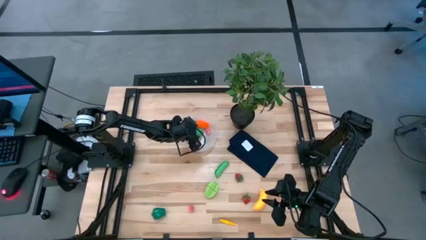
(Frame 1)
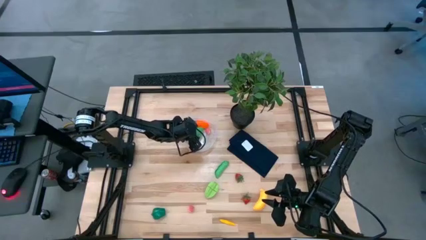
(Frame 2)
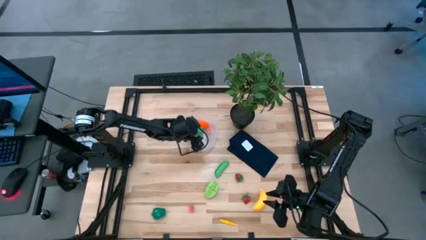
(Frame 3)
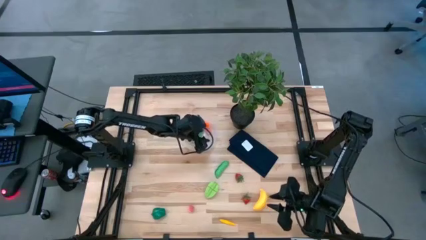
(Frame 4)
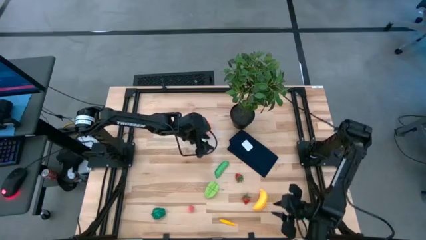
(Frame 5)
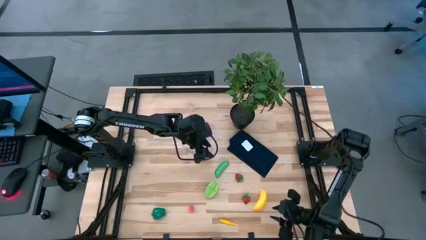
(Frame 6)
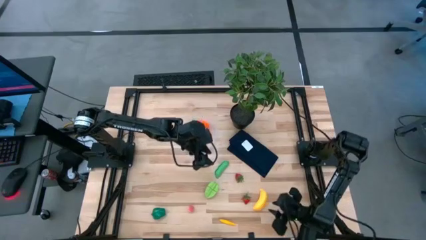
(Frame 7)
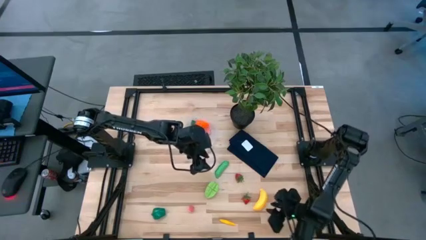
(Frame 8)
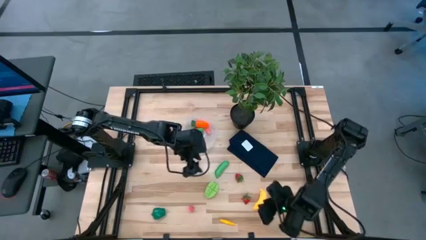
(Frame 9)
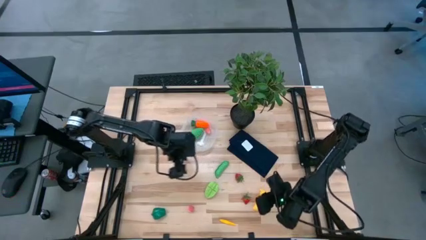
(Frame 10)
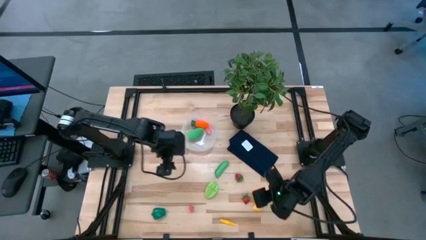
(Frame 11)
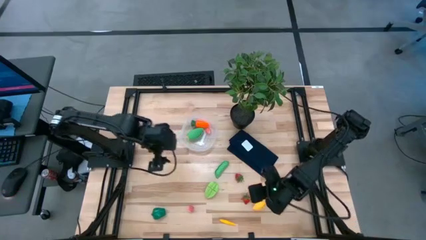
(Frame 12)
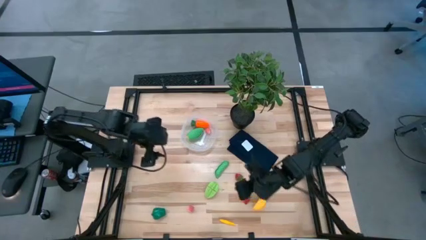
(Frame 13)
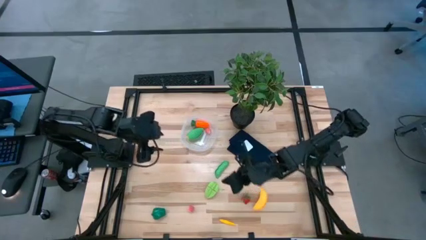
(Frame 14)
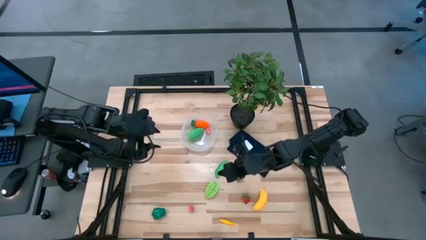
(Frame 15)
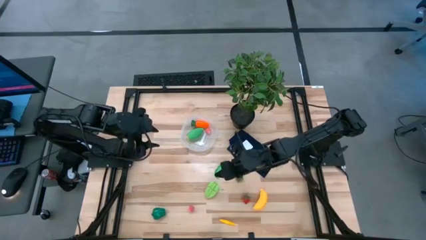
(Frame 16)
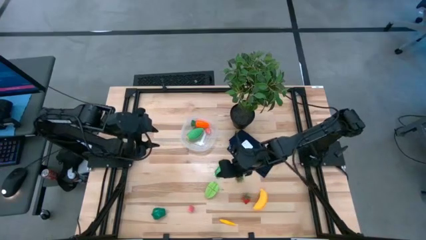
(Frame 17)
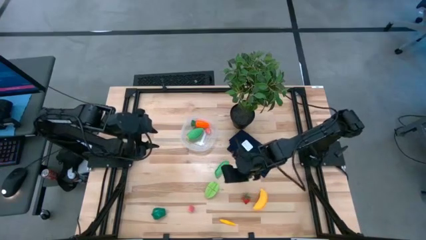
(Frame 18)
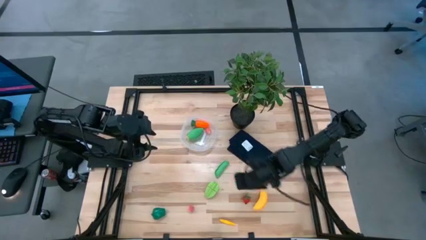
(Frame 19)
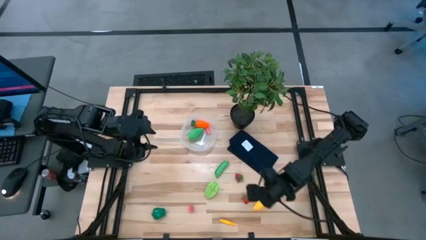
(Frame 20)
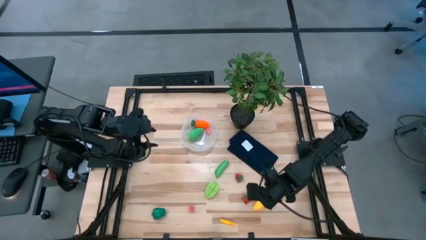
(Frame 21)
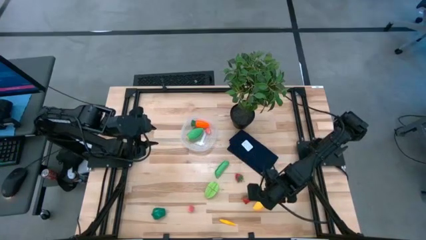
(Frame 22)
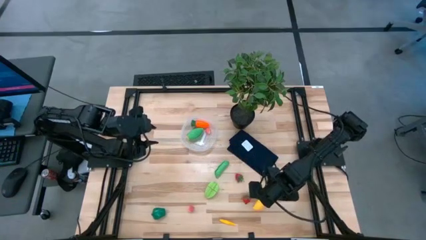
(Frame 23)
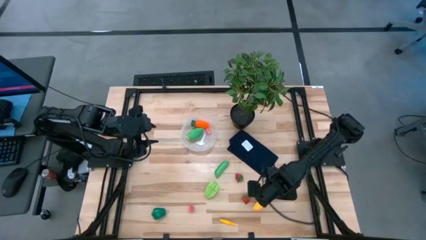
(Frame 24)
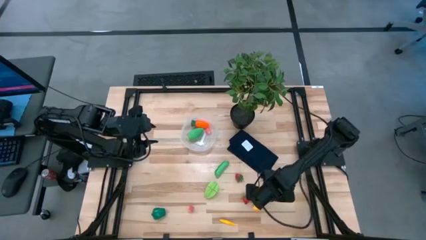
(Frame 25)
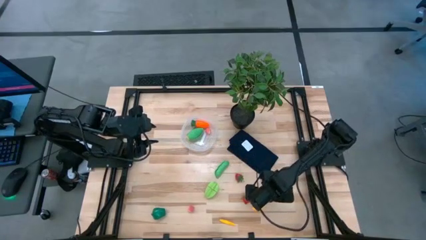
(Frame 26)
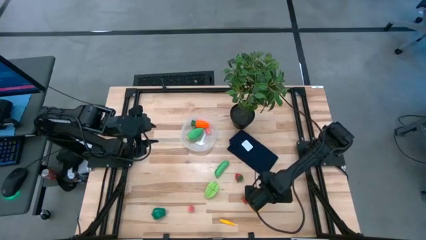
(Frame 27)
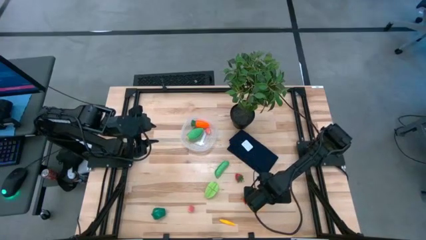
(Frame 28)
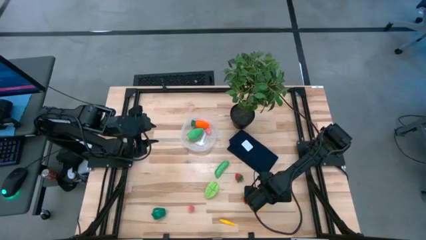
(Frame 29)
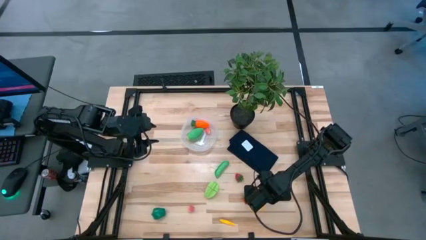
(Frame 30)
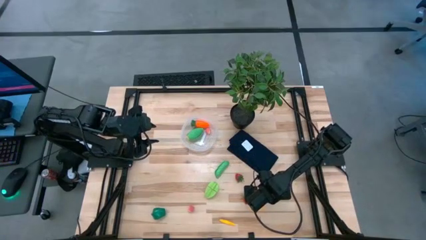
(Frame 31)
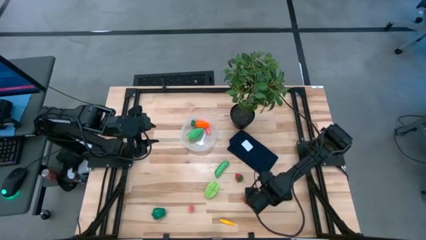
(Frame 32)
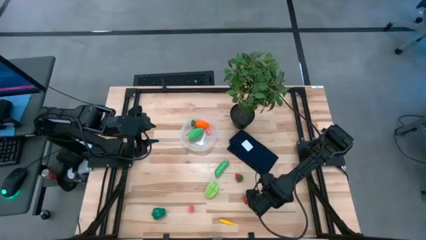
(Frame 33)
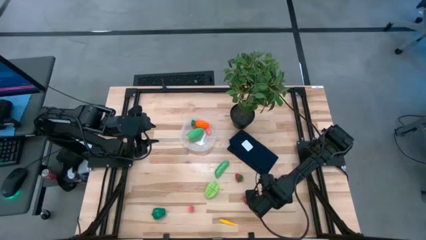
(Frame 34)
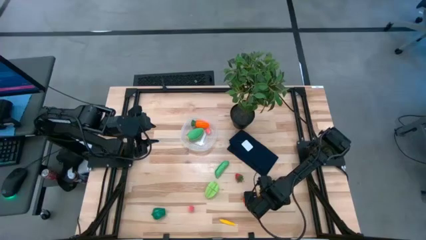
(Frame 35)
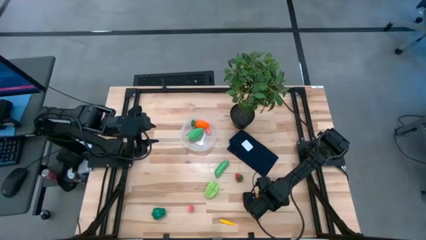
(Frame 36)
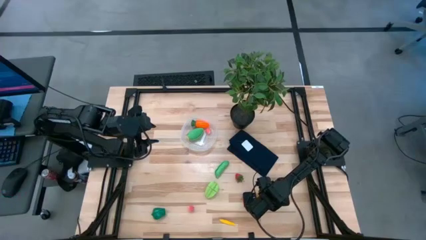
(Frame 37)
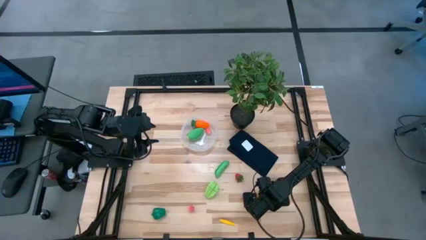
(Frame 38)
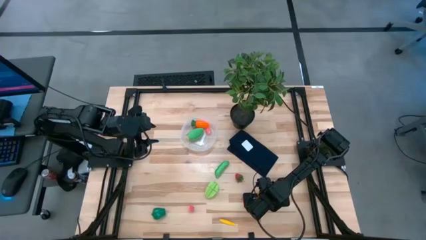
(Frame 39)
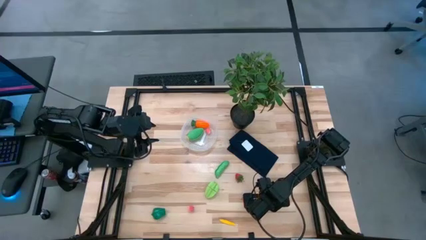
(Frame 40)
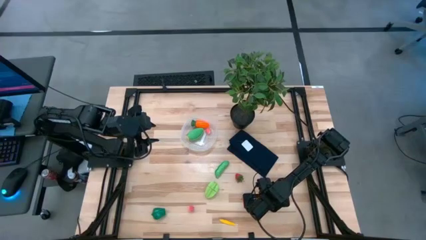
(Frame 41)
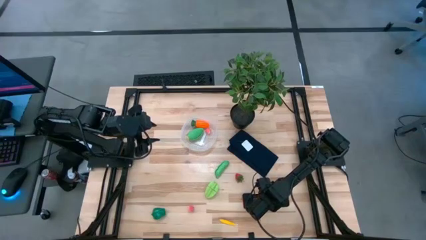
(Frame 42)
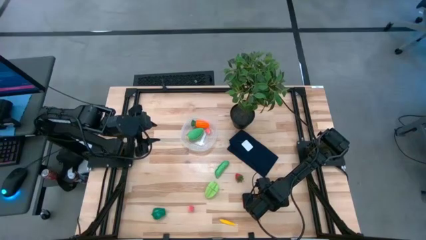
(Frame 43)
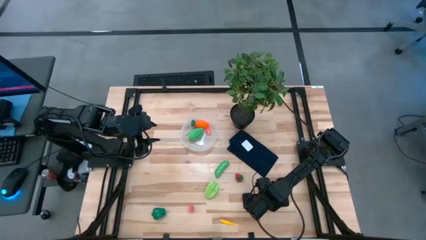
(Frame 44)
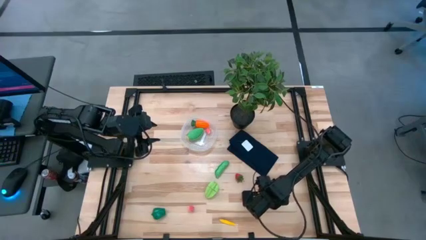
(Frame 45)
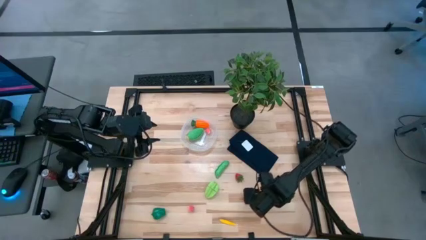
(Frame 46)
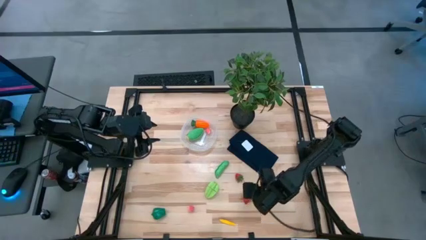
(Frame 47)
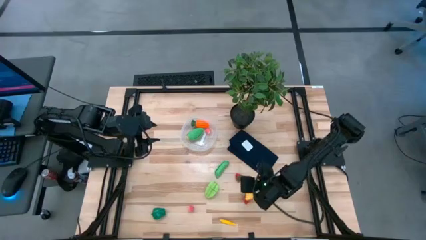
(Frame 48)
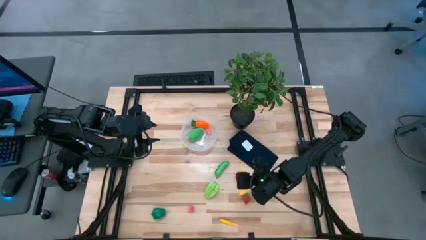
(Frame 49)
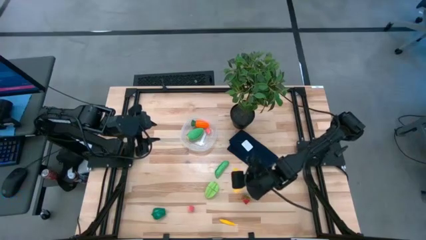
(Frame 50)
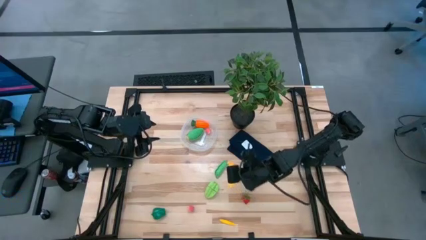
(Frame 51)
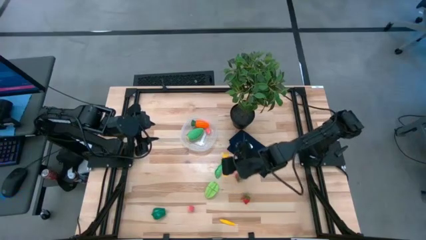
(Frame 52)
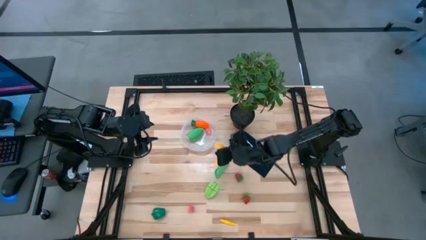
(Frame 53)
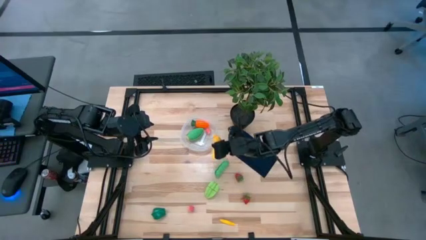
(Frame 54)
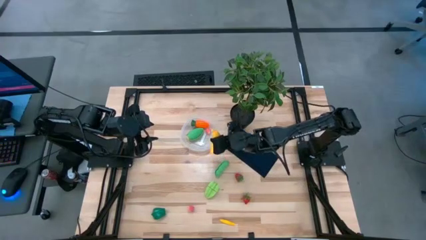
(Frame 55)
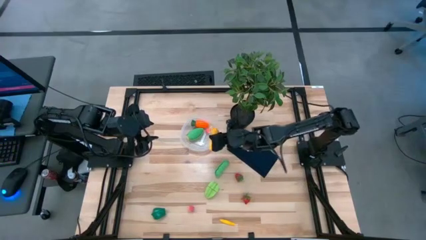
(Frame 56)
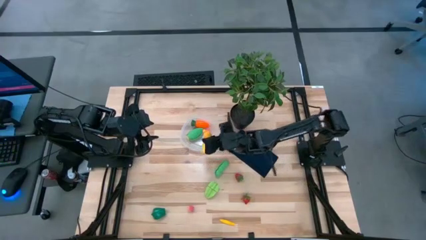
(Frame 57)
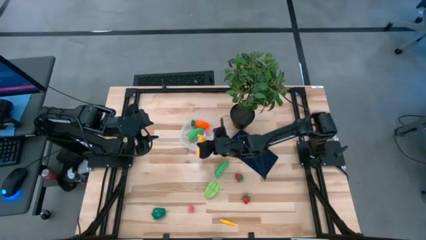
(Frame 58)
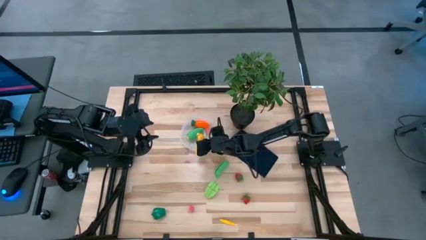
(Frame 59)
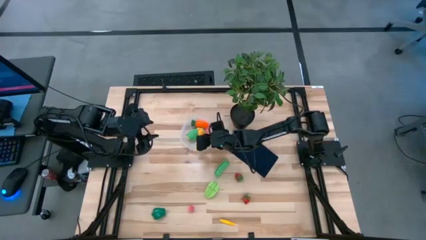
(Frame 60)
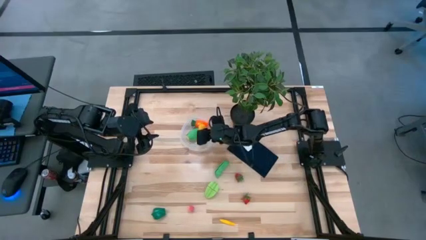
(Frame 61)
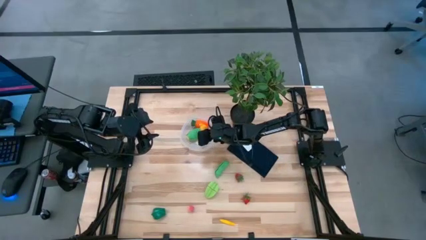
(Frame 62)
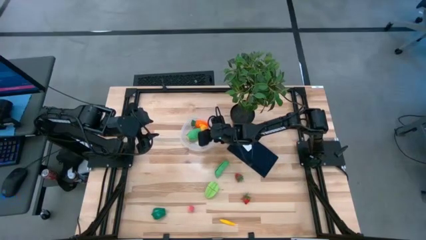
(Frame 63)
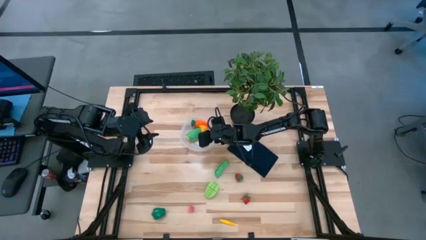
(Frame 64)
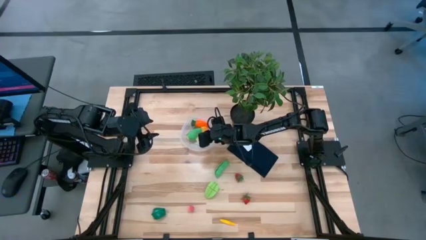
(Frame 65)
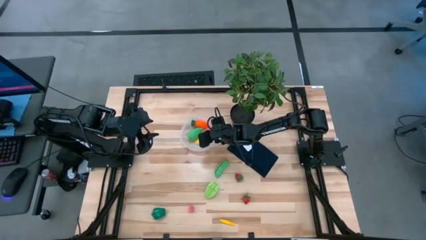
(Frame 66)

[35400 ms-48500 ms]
Task: Pick and placing Produce into tupperware
Put the yellow banana into the transparent bin

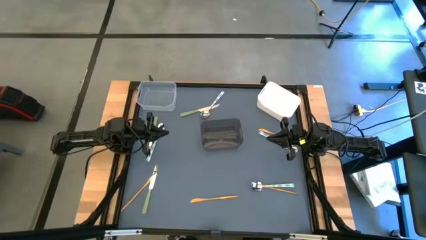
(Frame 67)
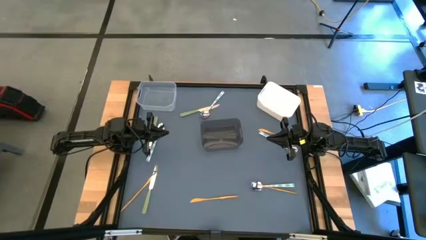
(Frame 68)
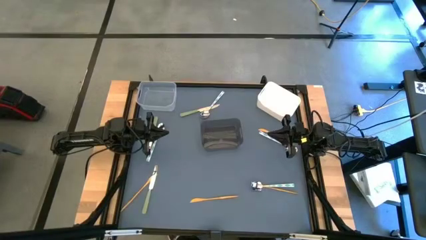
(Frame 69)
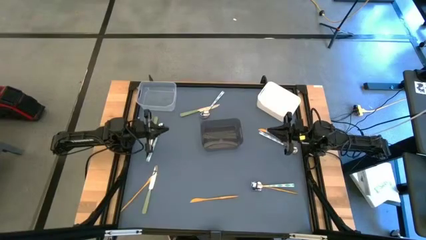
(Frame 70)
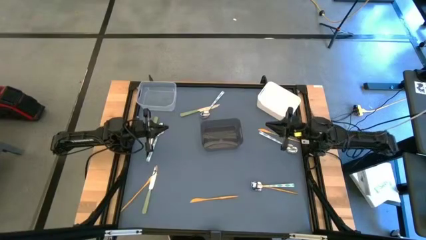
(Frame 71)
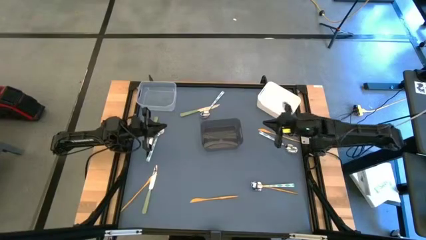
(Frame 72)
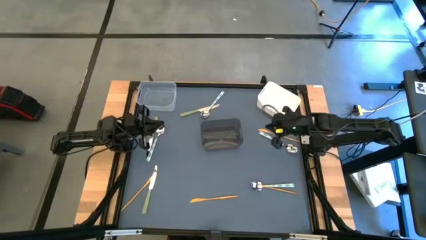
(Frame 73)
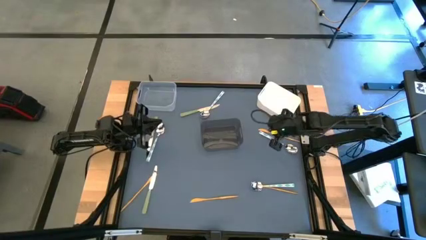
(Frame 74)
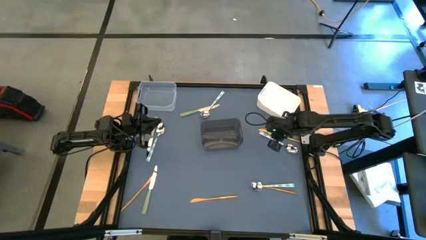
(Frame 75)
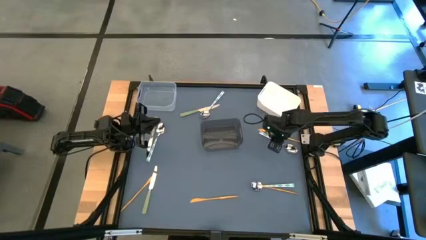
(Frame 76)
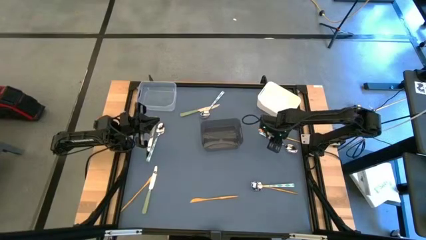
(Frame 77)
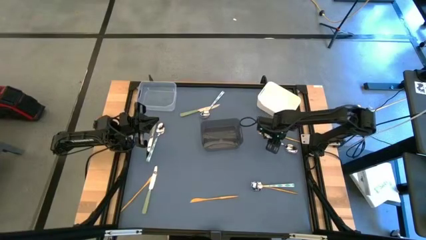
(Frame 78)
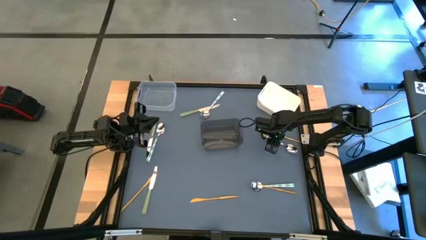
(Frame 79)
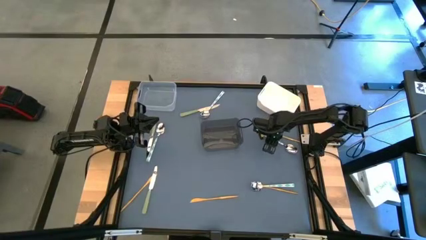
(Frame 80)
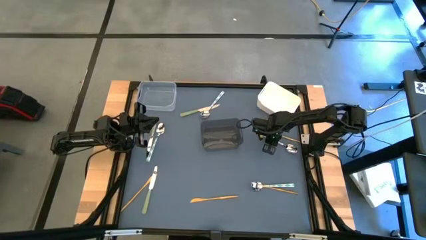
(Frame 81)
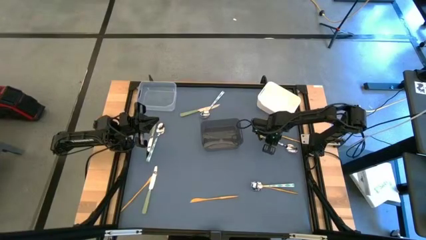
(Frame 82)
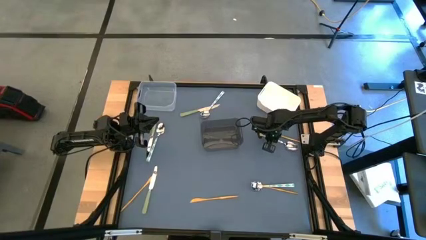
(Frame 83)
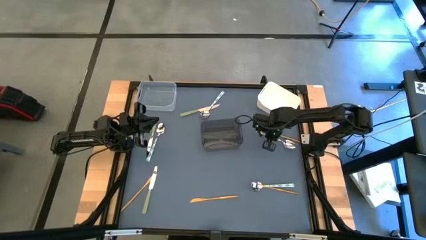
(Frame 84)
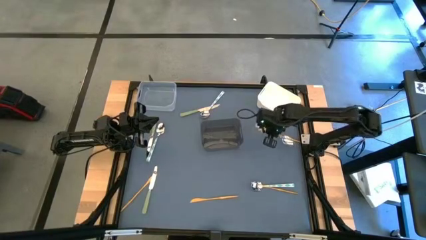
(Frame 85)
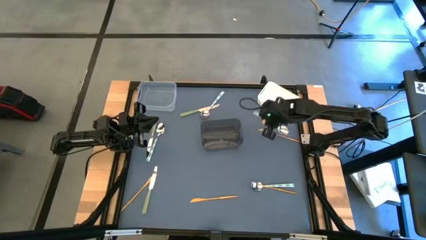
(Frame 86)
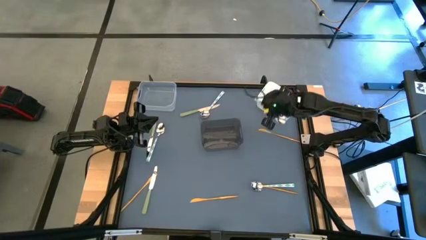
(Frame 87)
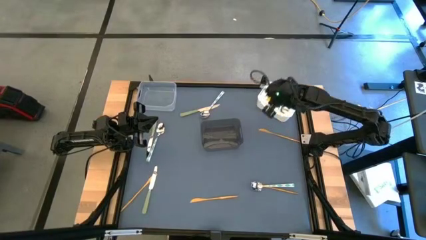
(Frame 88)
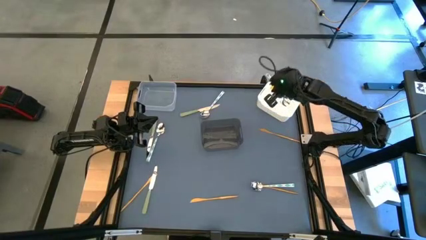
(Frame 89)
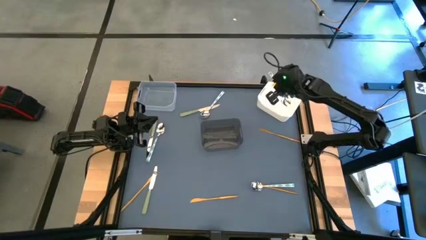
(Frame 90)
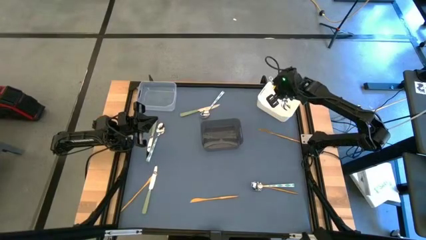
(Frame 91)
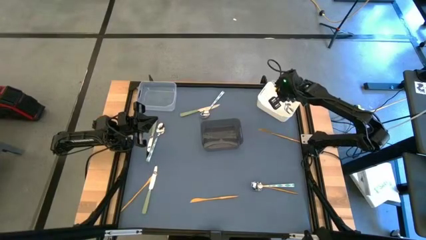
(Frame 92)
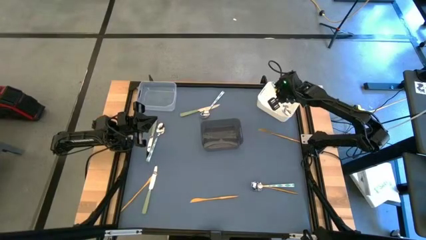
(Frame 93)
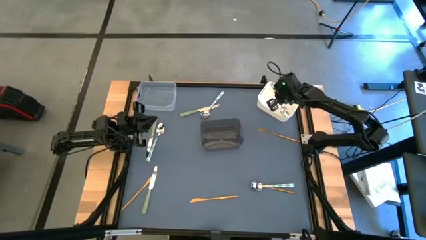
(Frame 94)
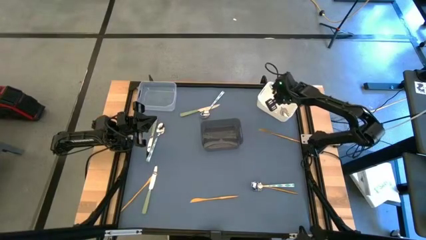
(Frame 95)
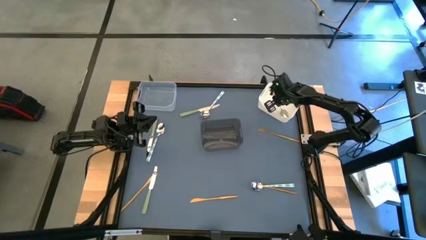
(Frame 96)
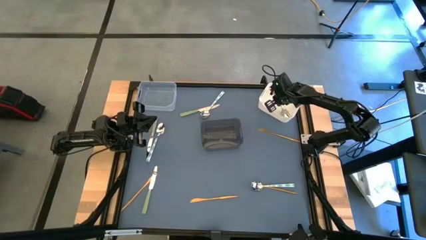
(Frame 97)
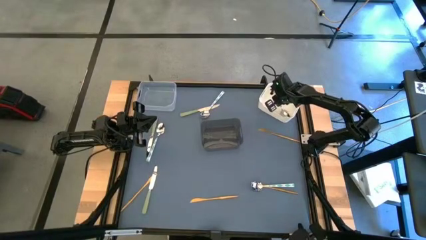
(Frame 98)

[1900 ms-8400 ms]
Task: Sort silverware by color (type)
Put the green spoon into the white bin
